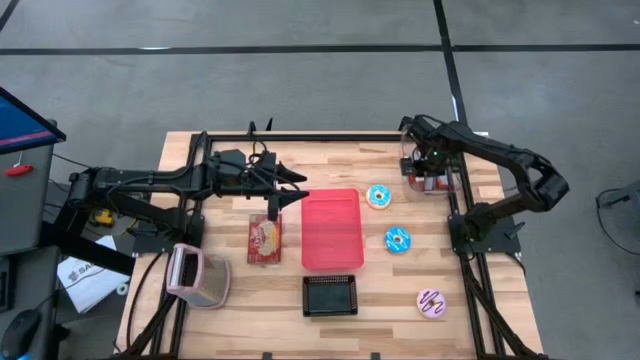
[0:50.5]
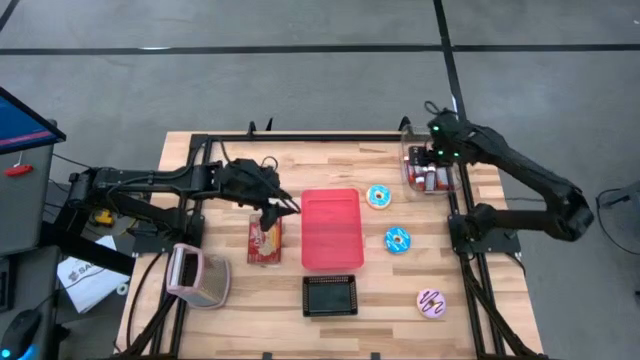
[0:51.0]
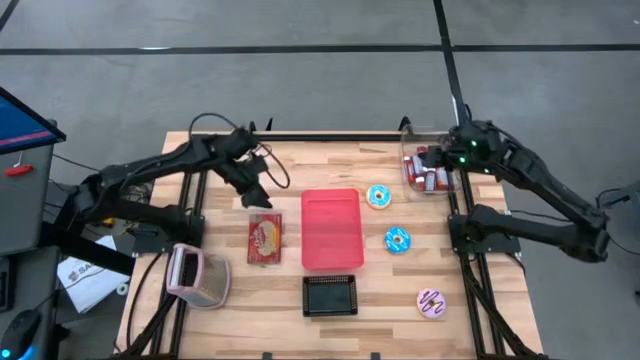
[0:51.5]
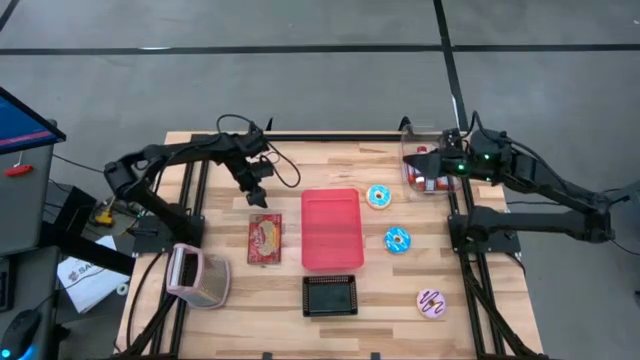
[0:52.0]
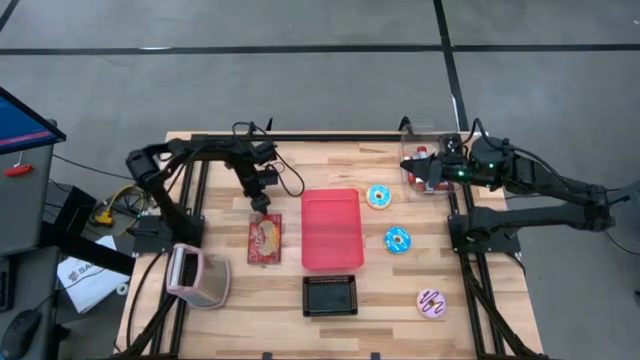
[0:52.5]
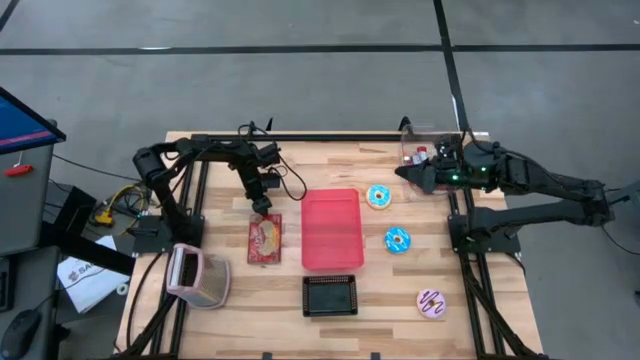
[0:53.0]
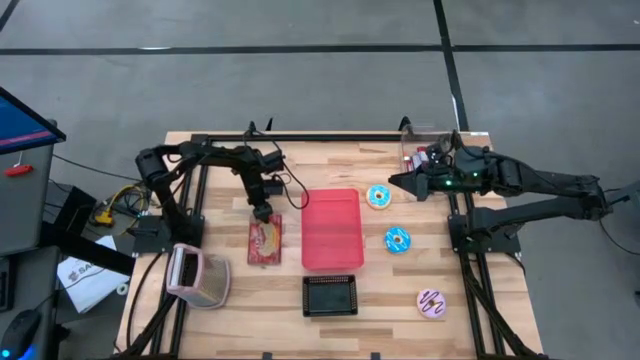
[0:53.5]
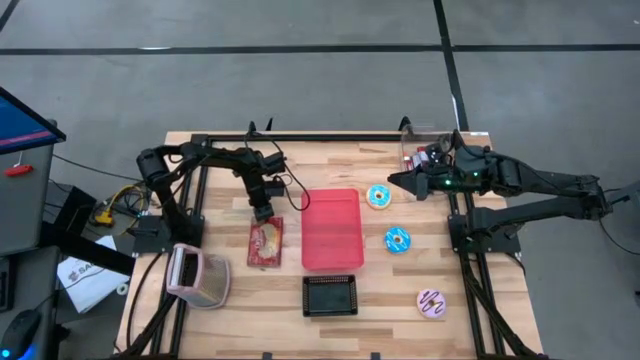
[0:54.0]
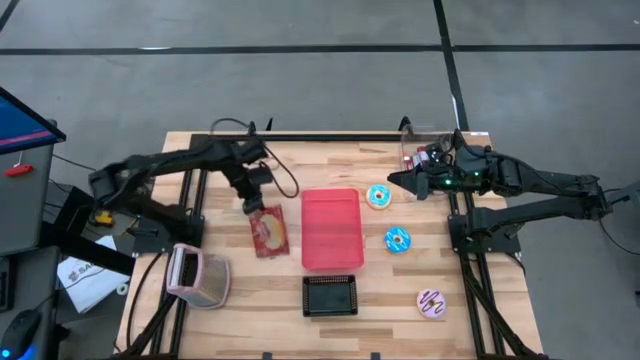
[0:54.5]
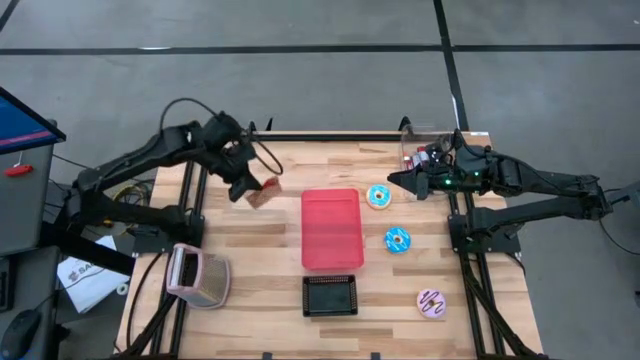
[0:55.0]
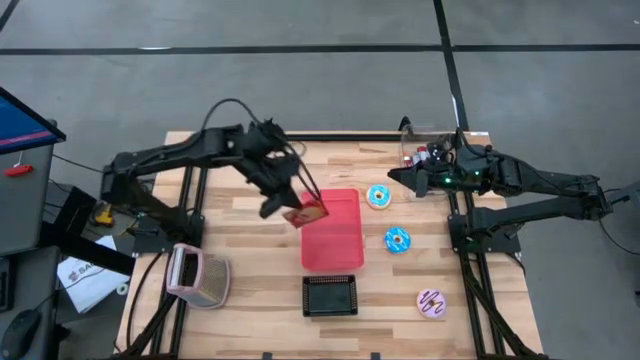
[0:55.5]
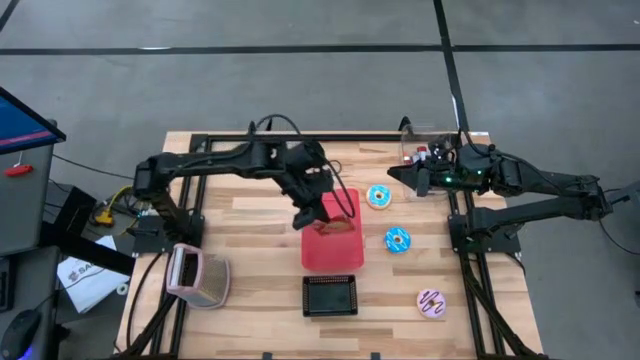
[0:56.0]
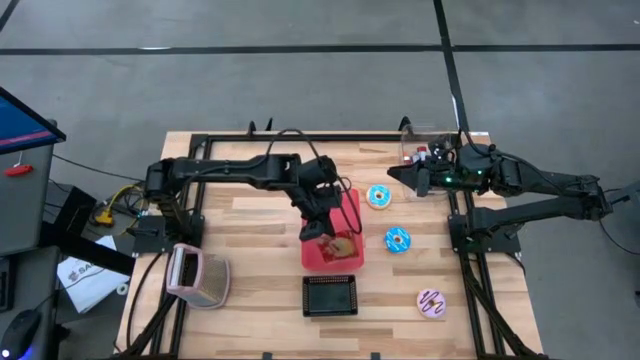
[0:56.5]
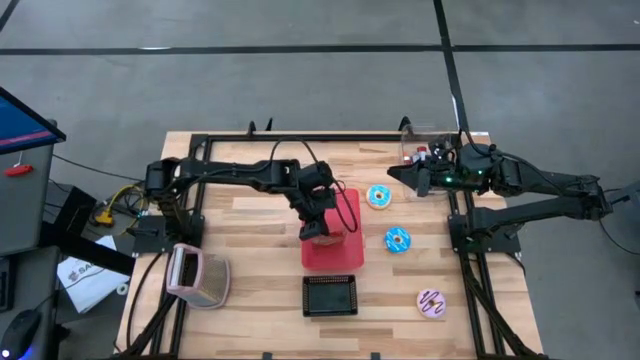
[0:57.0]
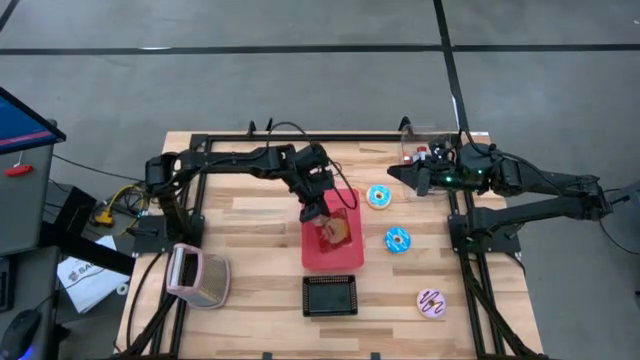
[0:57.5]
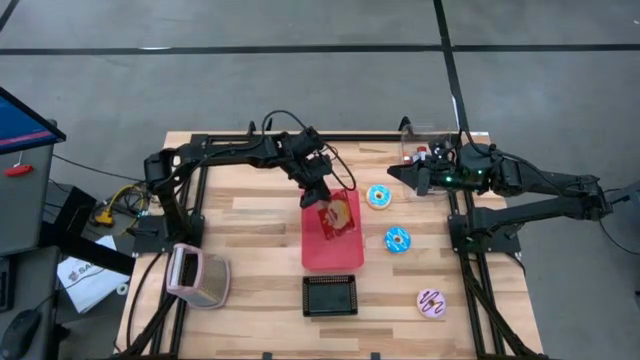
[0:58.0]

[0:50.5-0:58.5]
Put the red popcorn bag into the red bin

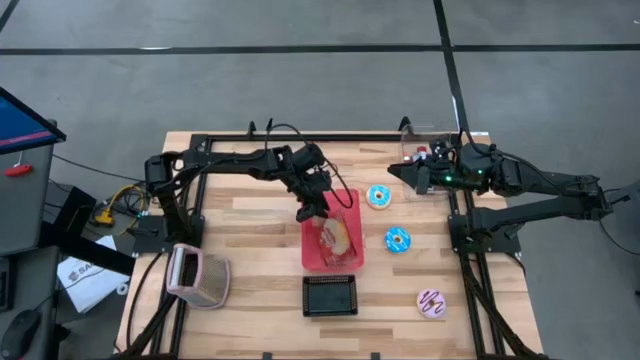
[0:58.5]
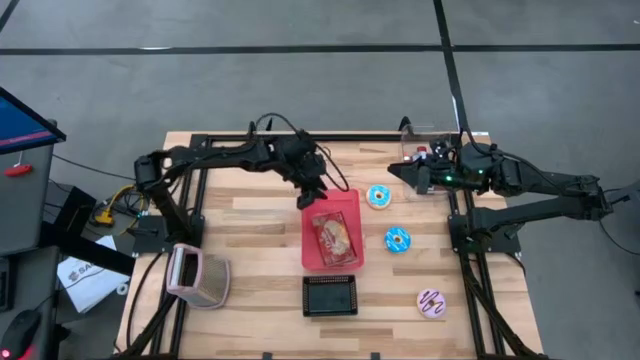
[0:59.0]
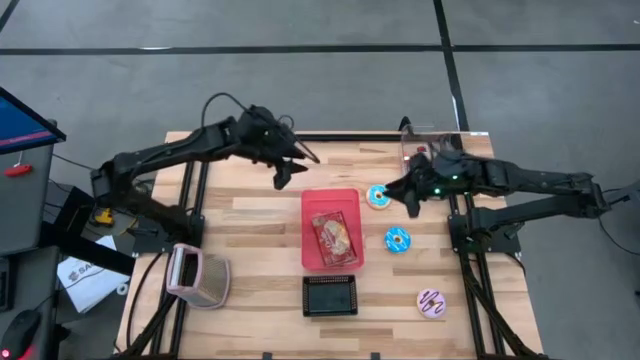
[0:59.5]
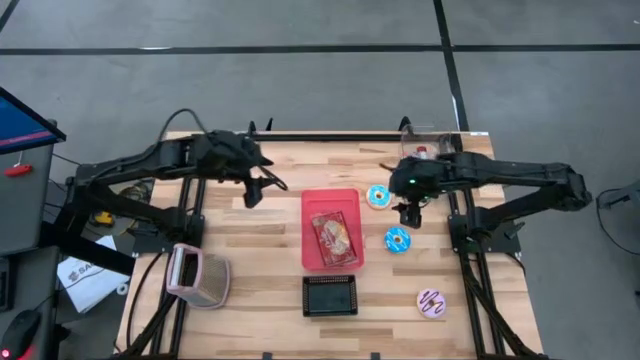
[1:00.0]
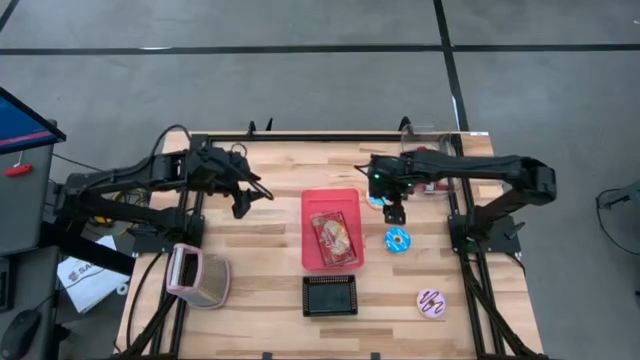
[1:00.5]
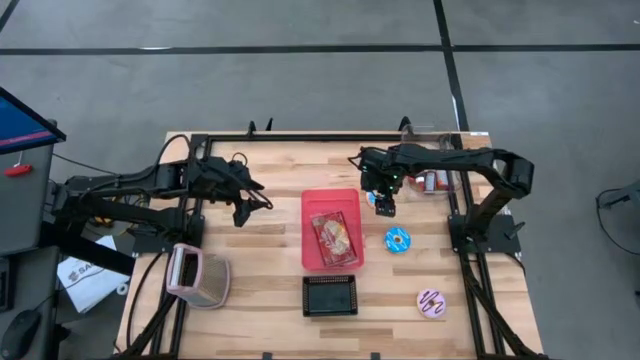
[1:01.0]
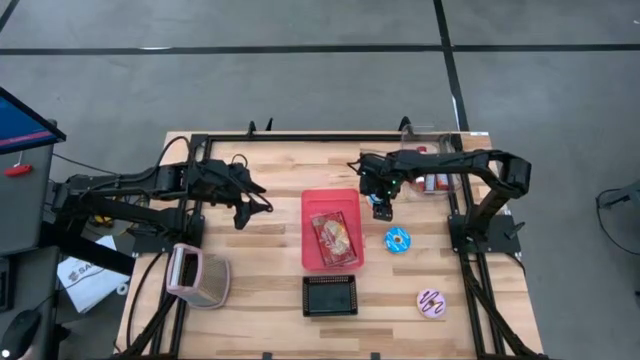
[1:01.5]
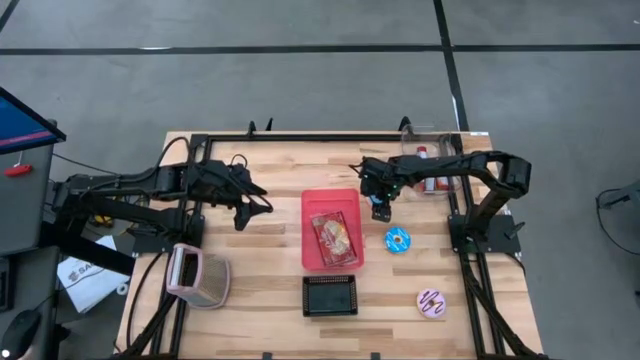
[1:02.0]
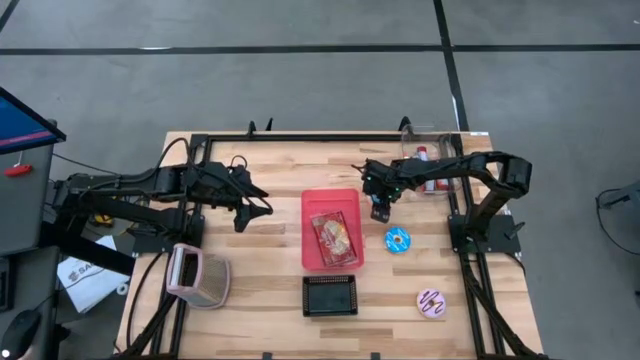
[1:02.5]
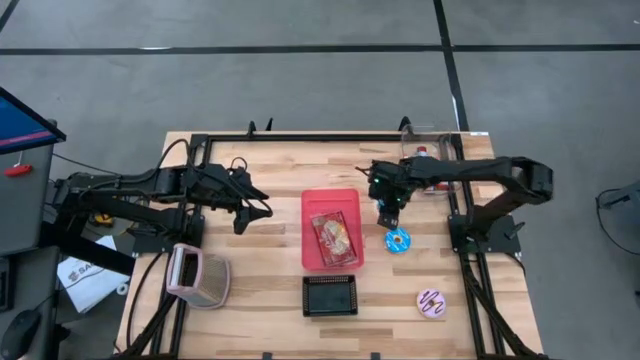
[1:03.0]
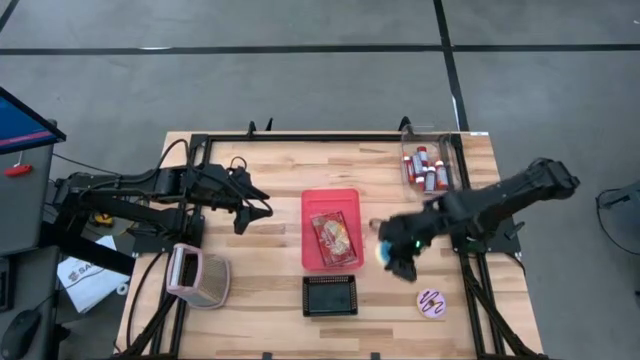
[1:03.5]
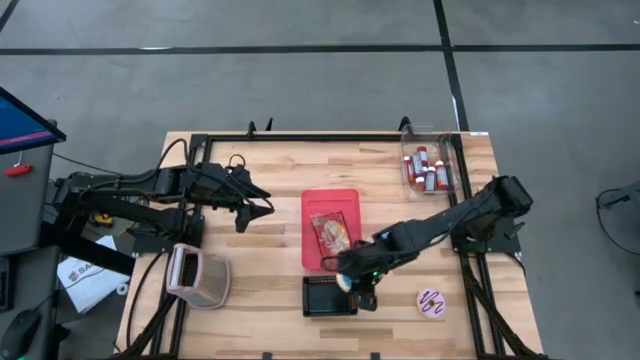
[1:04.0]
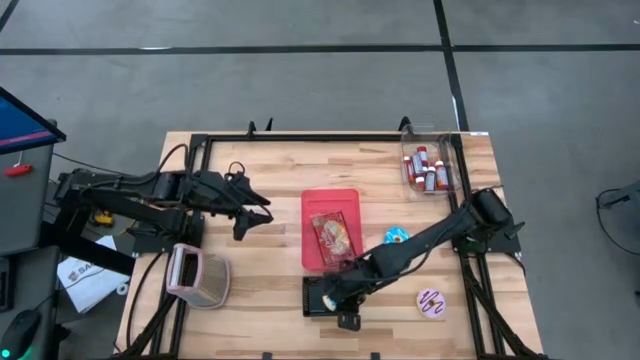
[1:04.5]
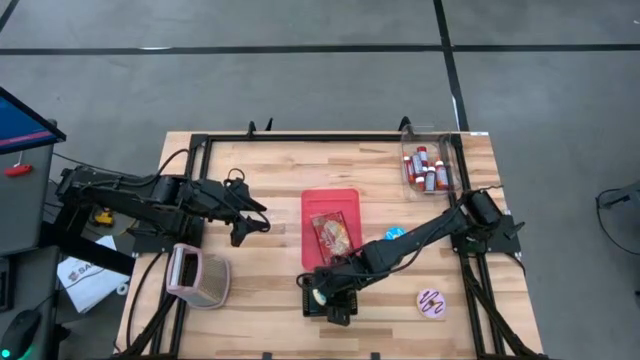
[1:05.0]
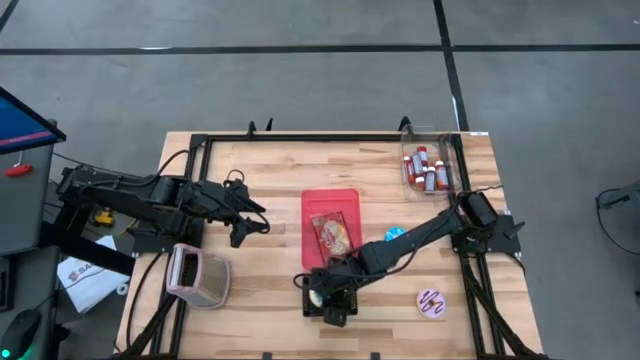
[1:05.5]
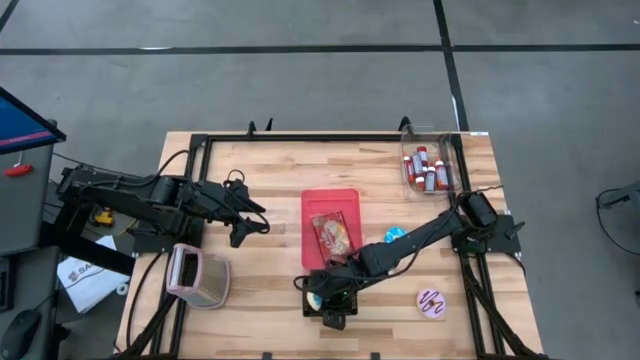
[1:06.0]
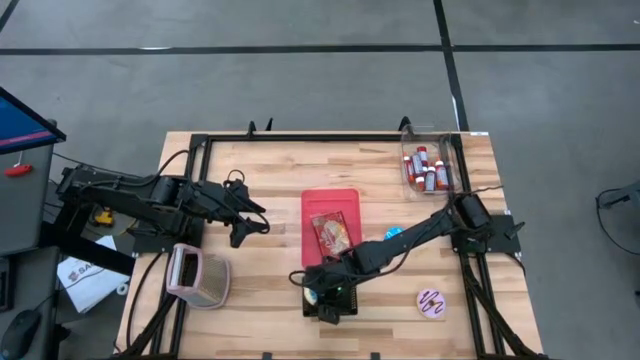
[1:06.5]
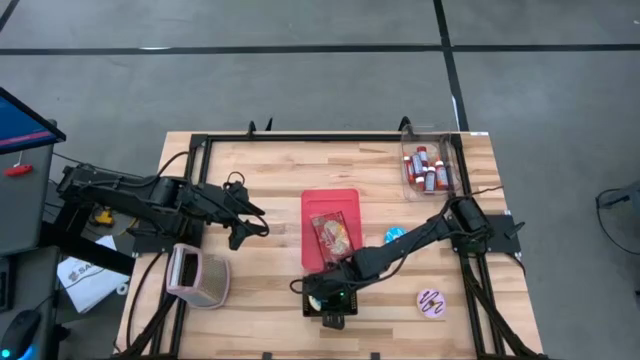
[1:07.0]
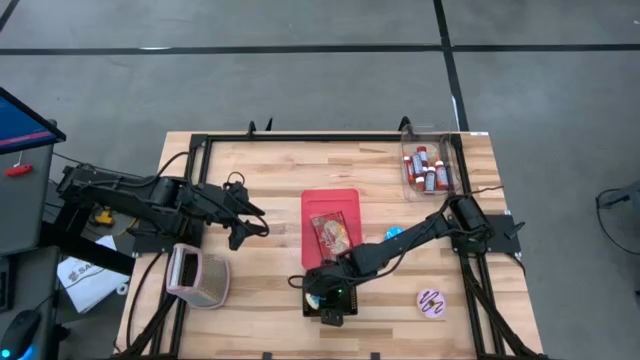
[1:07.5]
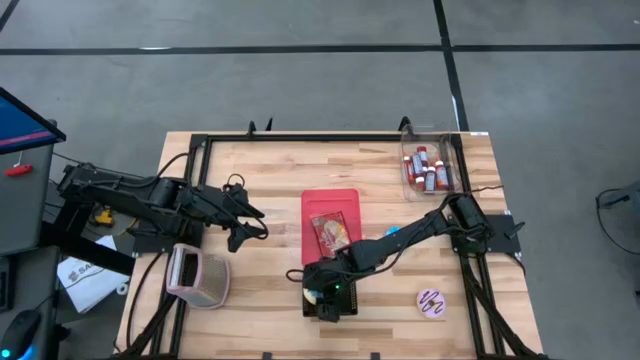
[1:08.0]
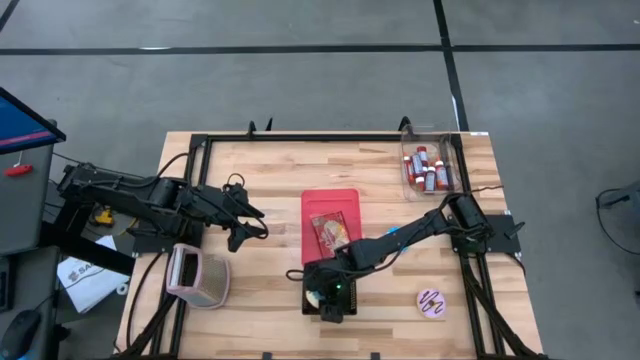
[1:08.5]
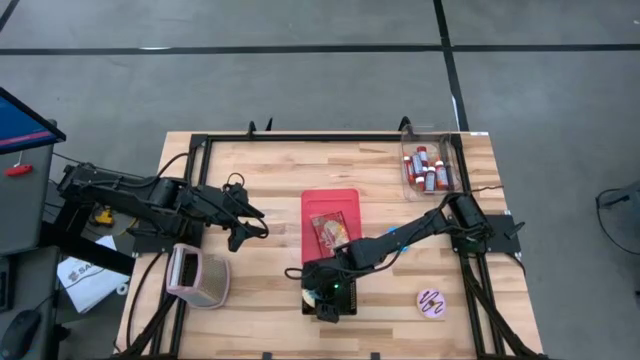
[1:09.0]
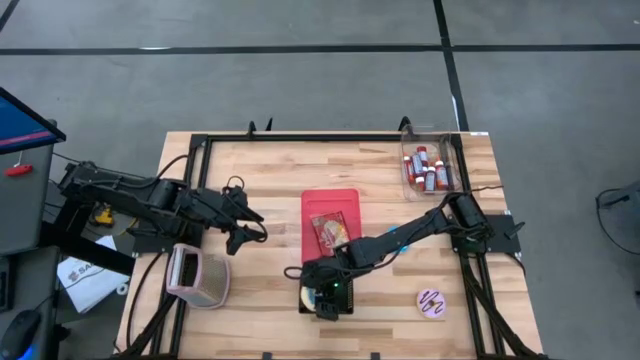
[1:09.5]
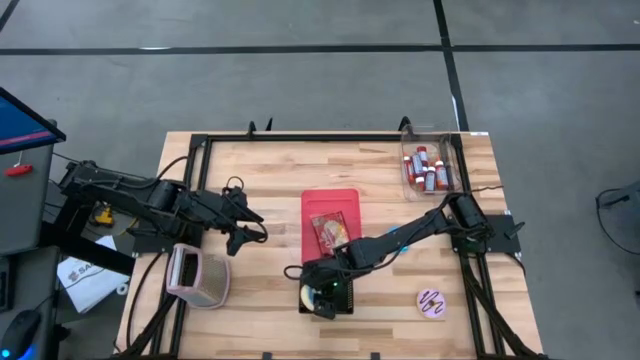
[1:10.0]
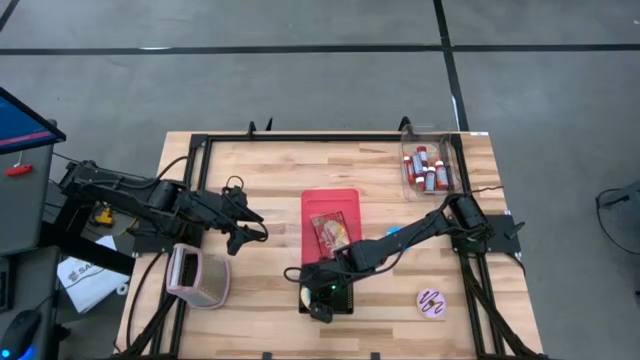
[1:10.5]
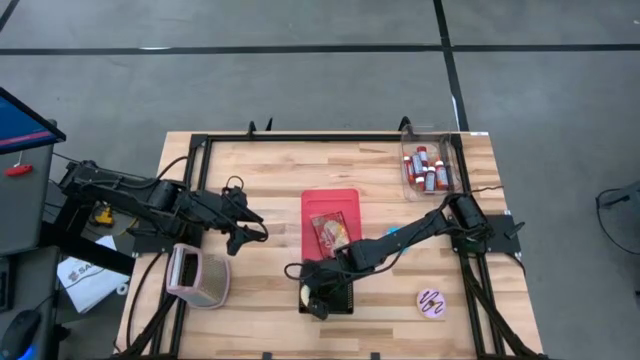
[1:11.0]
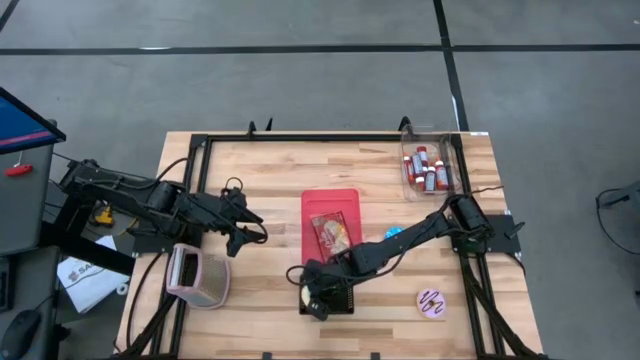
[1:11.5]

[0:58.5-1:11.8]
Put the top blue donut into the black bin
